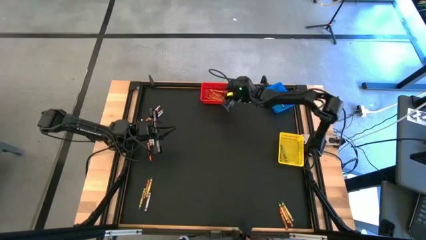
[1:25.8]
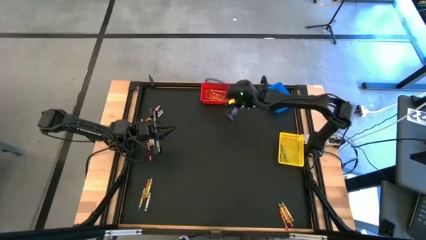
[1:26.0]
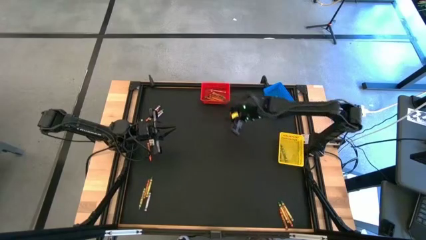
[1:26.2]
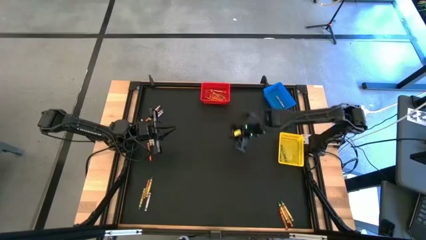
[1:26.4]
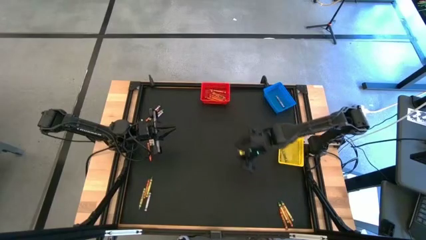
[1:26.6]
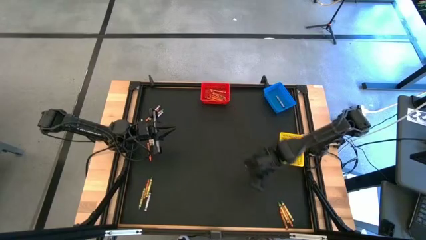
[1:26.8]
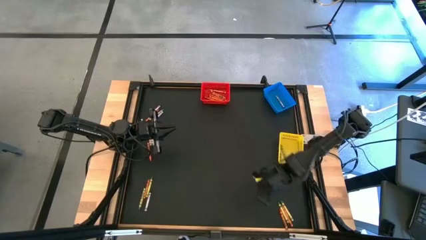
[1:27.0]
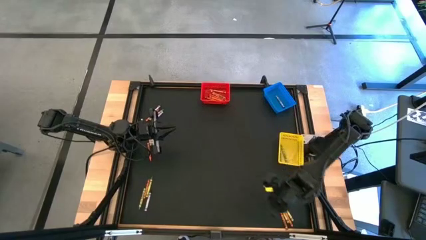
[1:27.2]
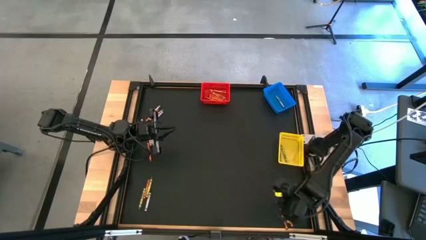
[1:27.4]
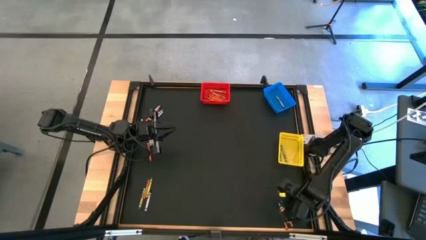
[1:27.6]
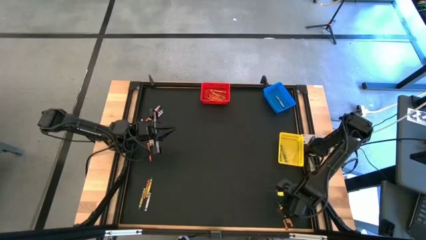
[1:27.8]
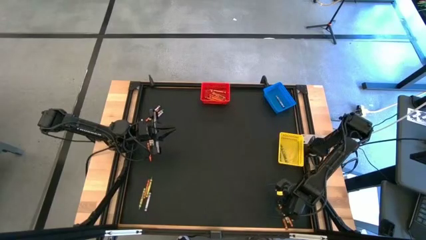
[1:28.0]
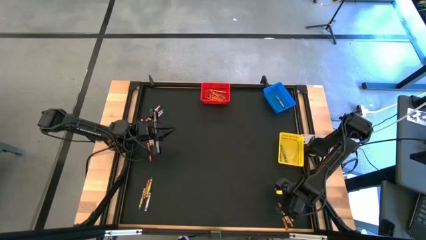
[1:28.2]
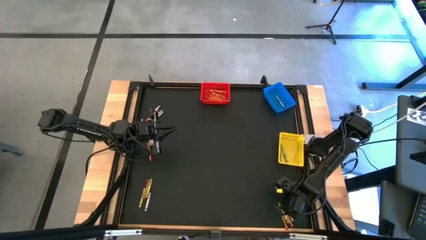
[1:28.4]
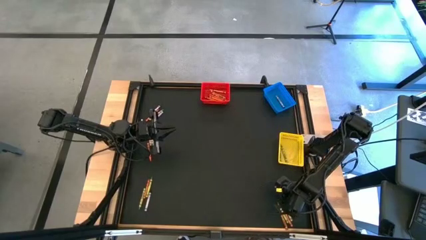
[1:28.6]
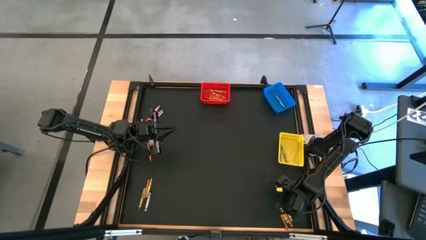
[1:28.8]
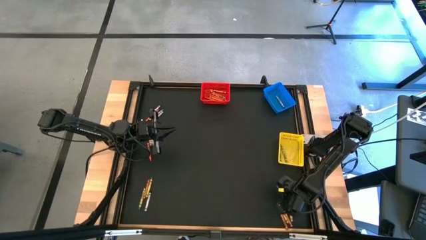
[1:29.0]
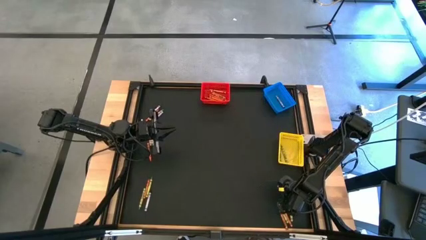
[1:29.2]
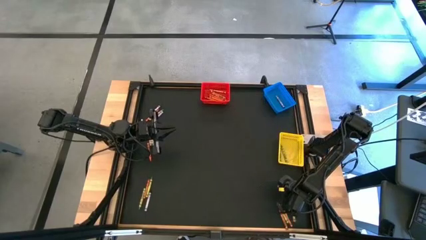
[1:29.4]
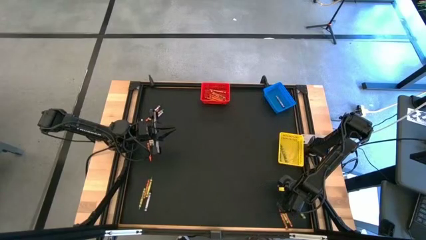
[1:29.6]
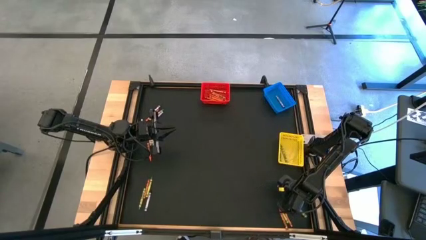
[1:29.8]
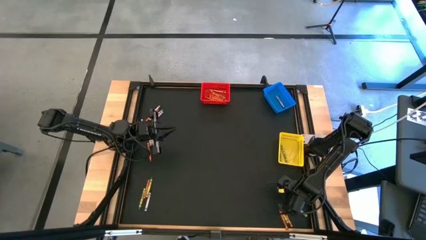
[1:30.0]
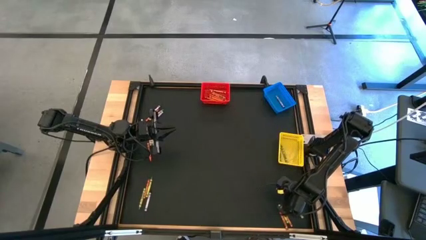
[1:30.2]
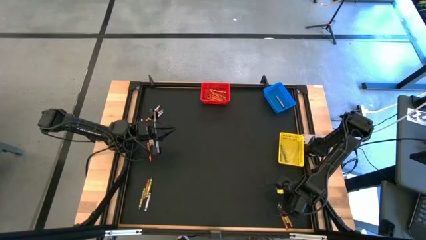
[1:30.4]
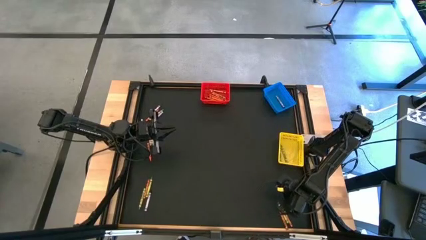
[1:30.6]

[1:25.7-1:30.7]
Task: Sort crayons
Put the green crayon into the yellow bin

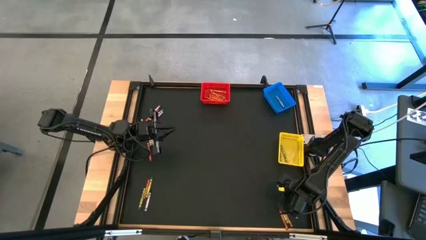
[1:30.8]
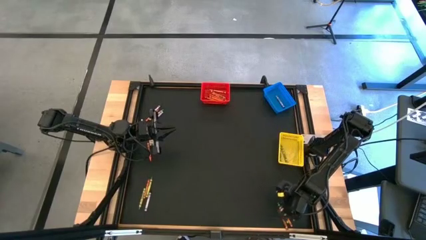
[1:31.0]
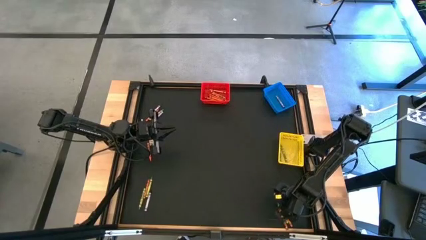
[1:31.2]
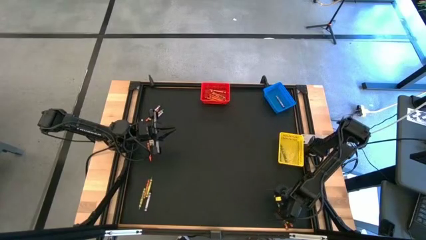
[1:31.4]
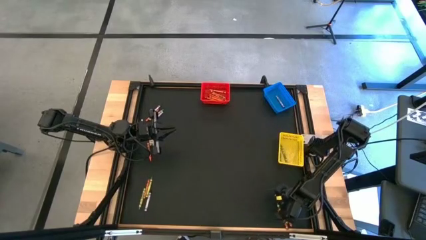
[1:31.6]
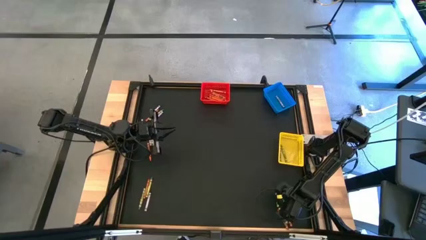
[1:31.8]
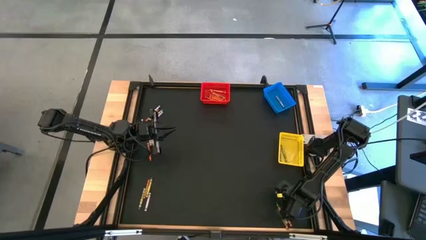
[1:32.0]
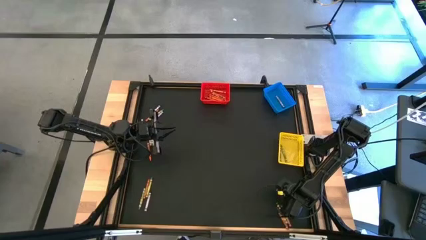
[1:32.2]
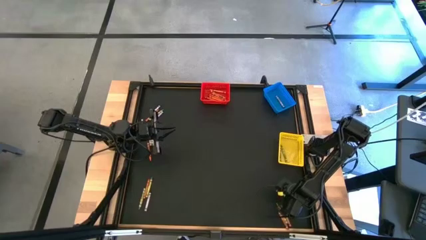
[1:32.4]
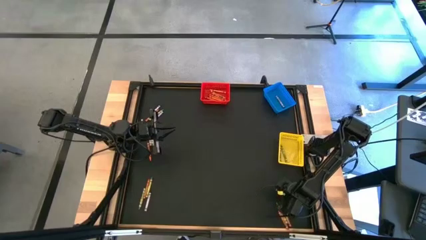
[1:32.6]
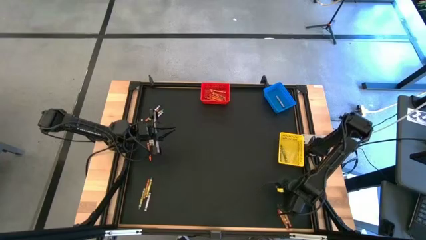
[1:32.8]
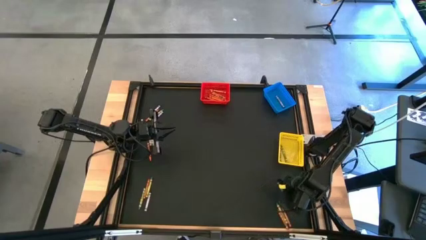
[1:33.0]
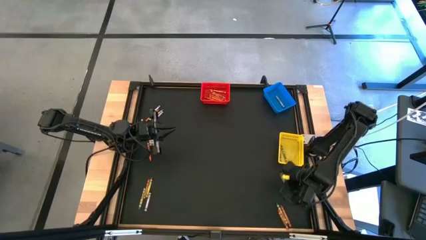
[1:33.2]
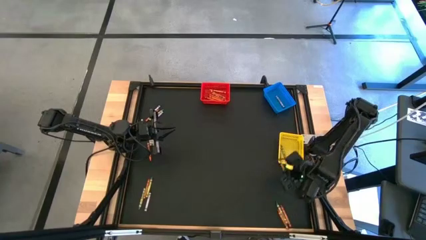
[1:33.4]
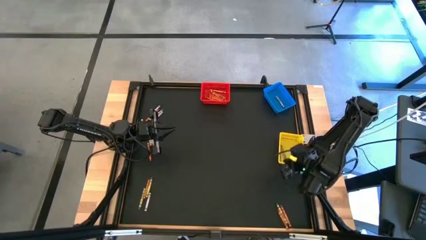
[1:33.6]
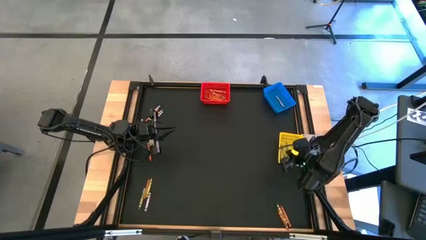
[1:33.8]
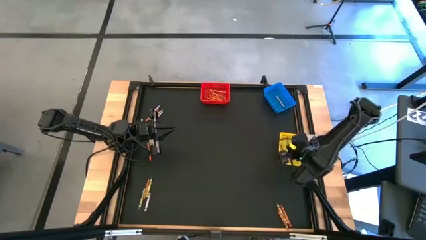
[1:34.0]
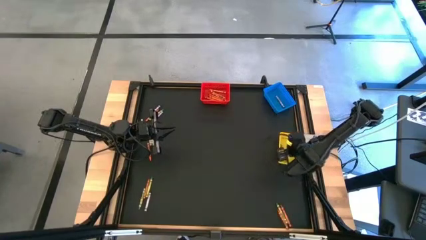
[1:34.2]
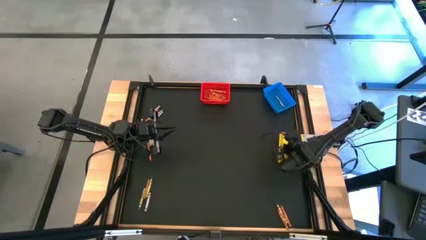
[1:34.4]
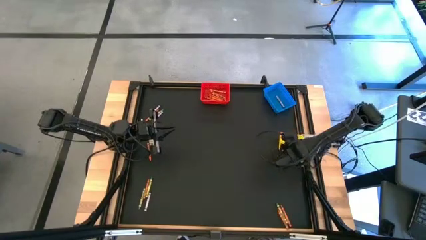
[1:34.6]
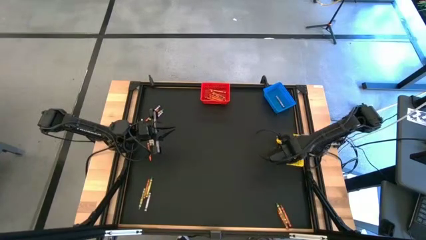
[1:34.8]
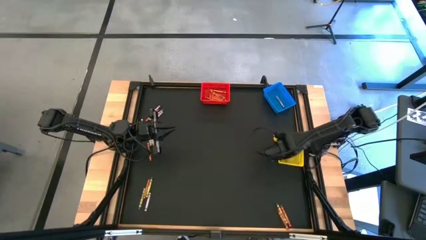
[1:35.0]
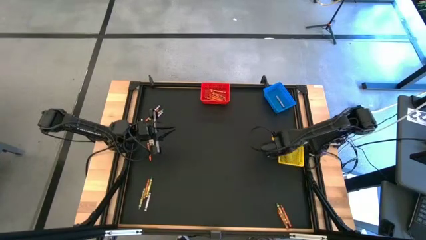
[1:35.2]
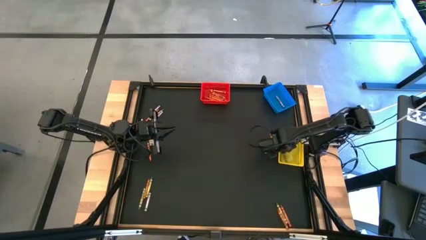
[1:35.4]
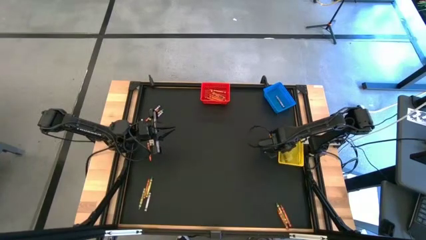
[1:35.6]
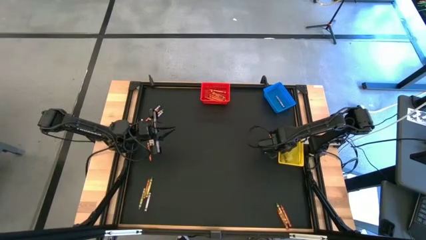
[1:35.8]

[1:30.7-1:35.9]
Put the green crayon into the yellow bin

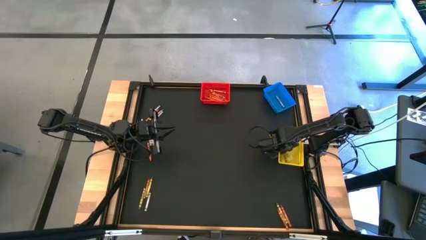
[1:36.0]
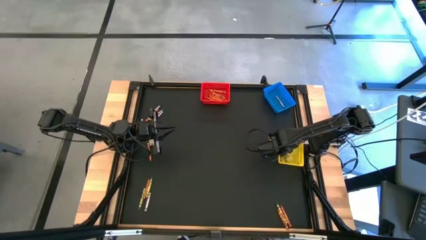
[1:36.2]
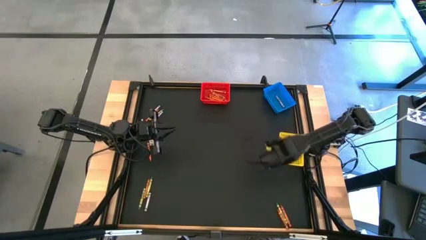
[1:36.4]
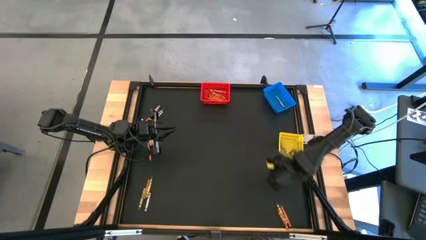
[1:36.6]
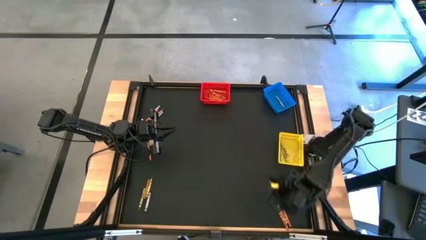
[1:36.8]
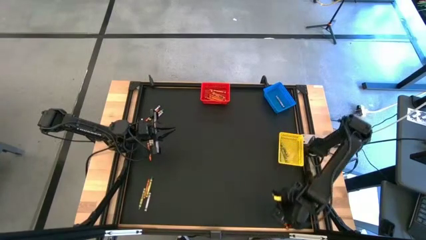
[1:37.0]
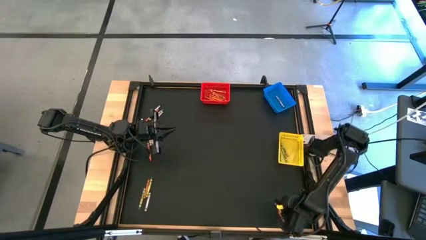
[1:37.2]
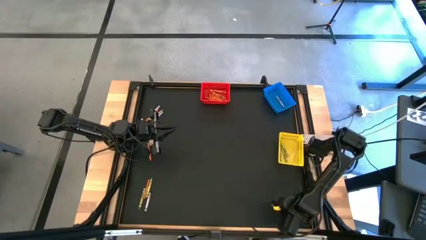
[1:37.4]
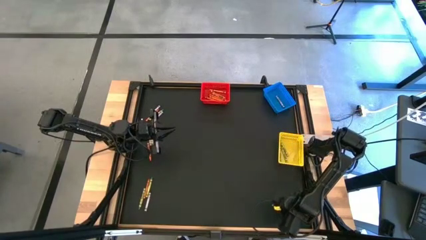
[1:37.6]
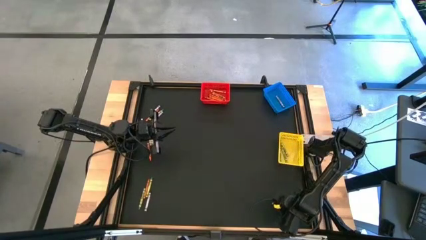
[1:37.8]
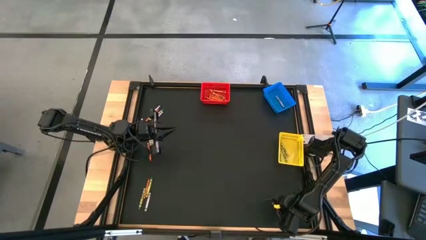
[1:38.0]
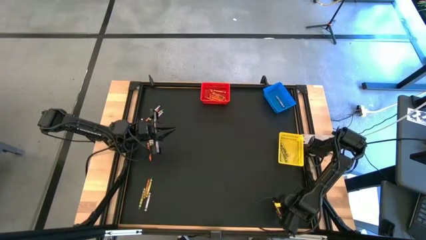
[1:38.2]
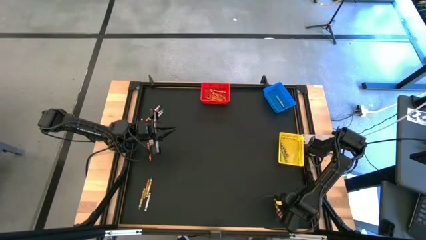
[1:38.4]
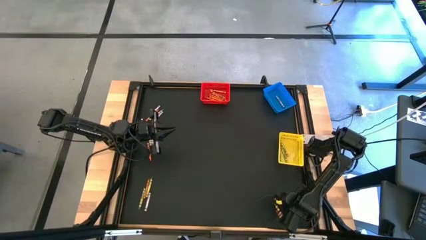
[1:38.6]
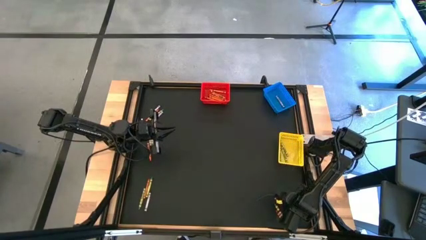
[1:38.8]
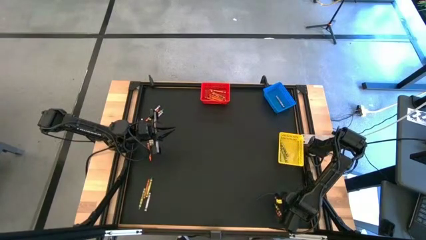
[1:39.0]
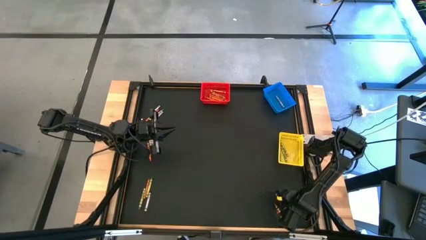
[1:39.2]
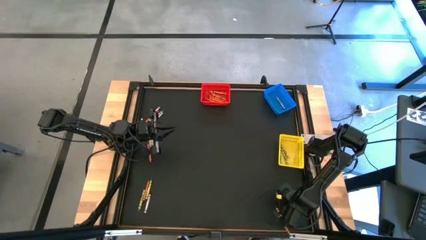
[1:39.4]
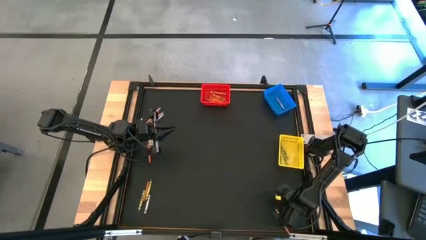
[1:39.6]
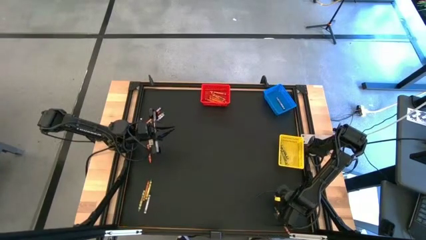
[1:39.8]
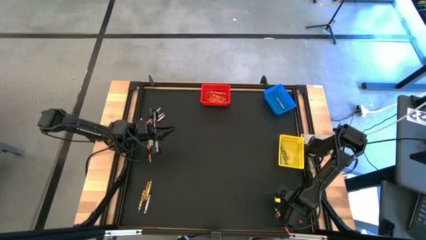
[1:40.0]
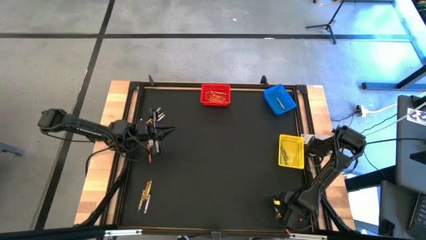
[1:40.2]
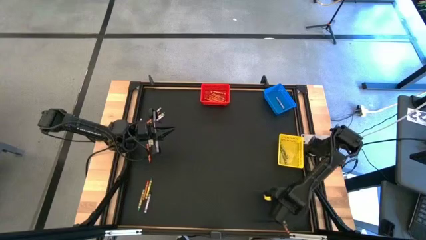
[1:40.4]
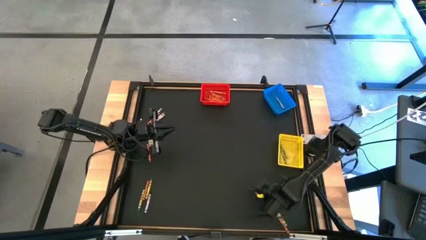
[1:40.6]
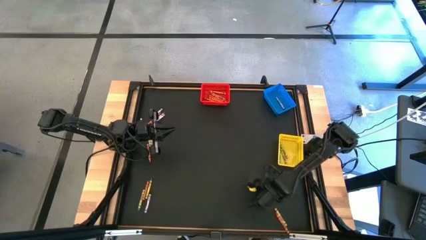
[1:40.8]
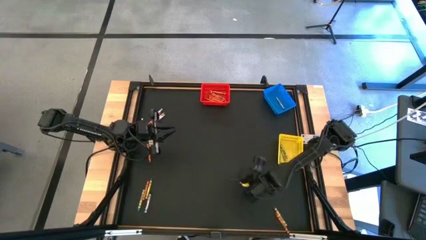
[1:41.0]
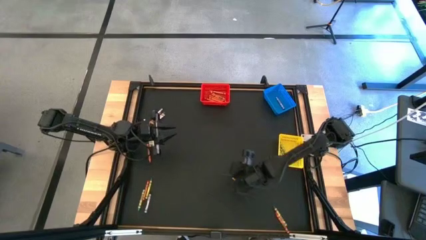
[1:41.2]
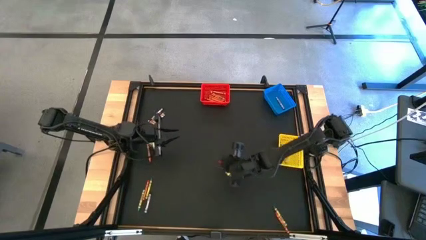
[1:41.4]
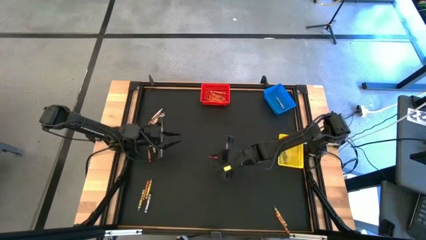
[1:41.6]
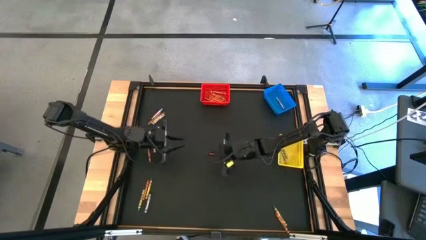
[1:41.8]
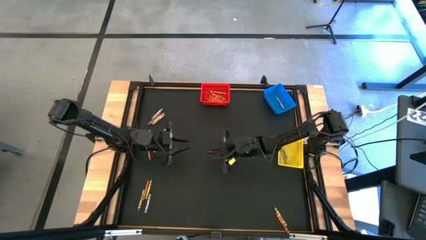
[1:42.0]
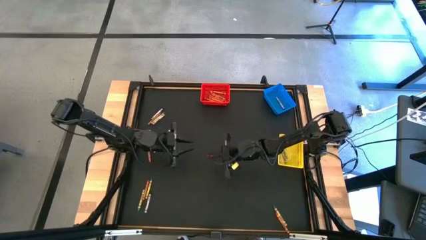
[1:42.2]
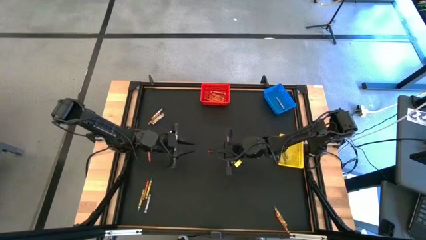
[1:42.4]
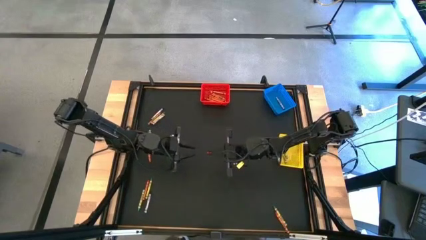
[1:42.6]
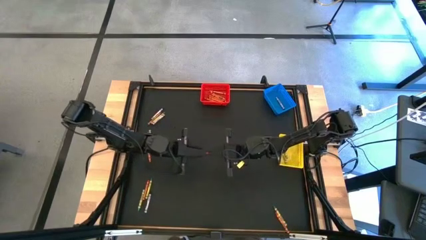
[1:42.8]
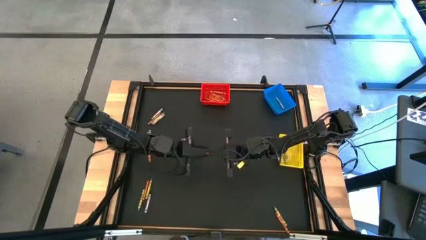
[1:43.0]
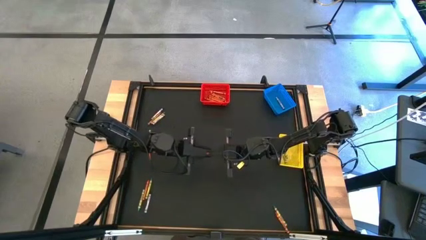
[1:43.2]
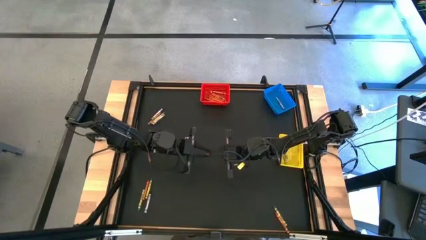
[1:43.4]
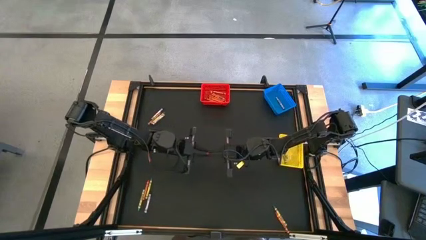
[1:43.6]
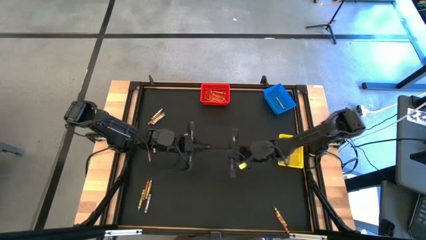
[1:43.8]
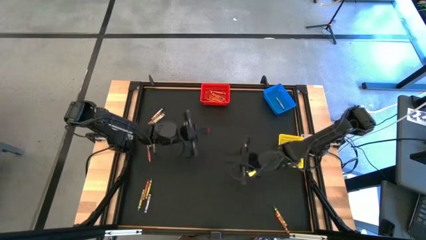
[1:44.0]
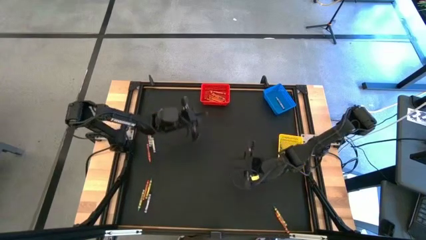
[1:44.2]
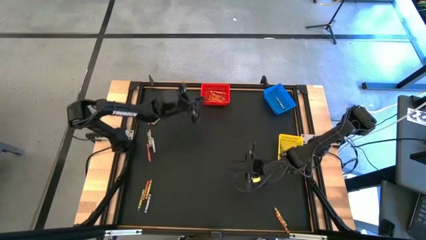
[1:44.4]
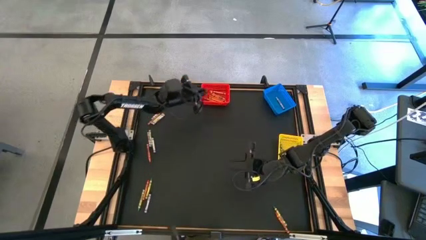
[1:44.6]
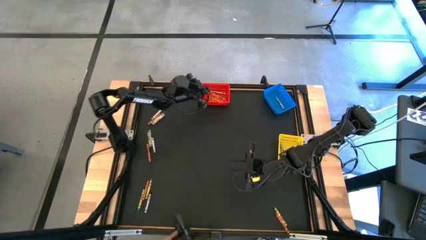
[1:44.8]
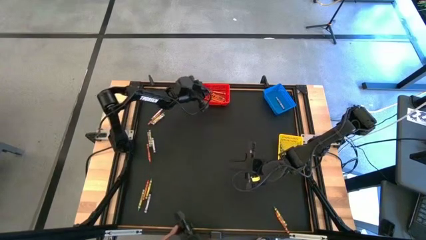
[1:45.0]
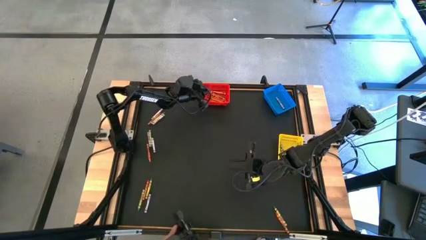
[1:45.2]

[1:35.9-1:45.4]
Put the orange crayon into the red bin
